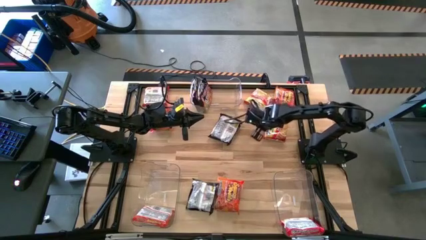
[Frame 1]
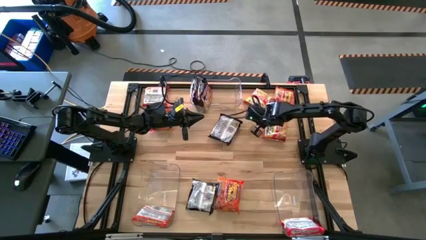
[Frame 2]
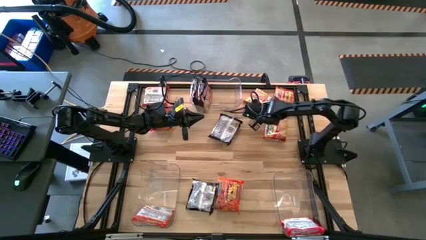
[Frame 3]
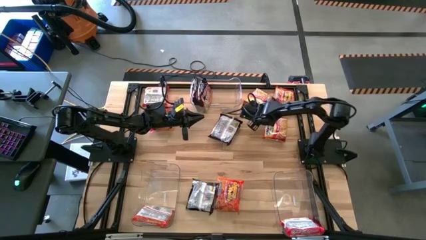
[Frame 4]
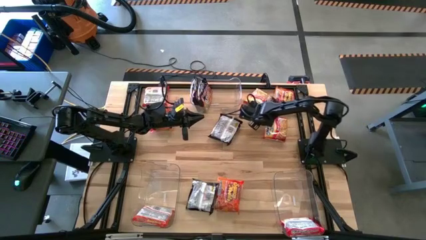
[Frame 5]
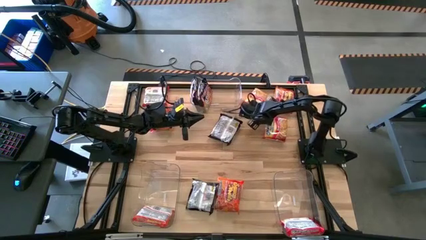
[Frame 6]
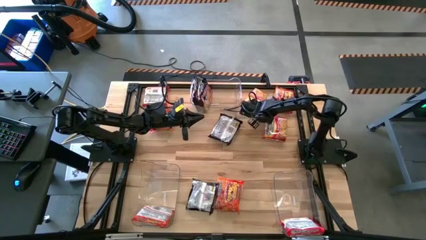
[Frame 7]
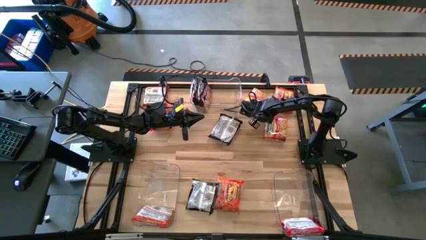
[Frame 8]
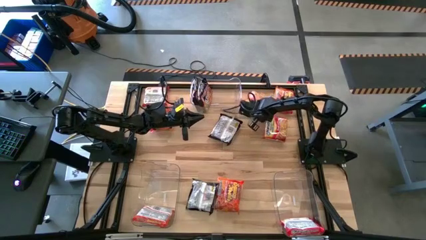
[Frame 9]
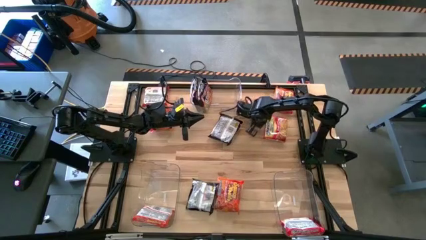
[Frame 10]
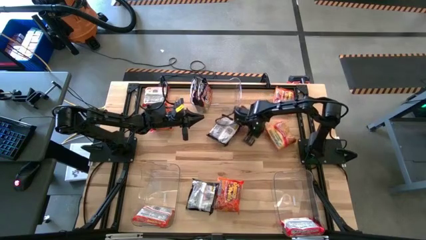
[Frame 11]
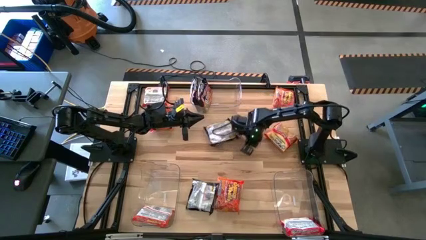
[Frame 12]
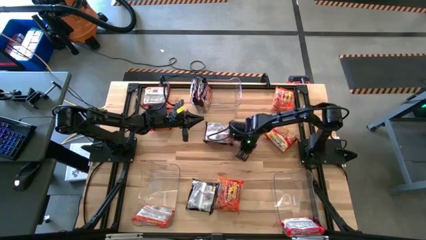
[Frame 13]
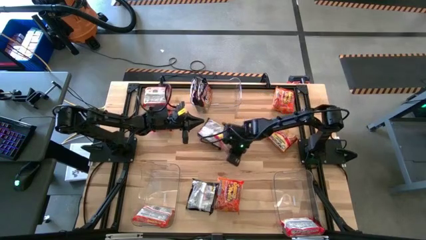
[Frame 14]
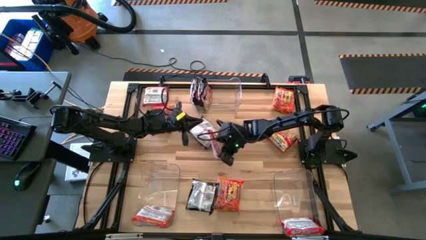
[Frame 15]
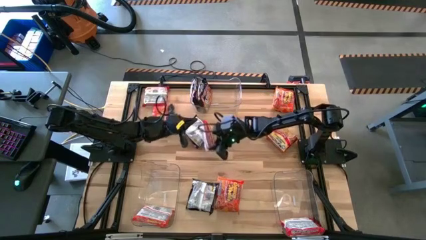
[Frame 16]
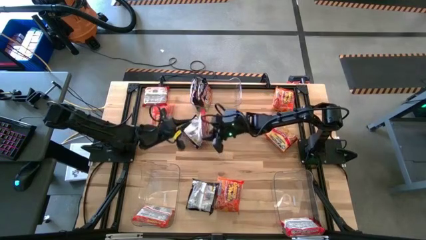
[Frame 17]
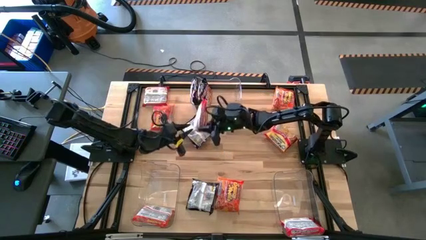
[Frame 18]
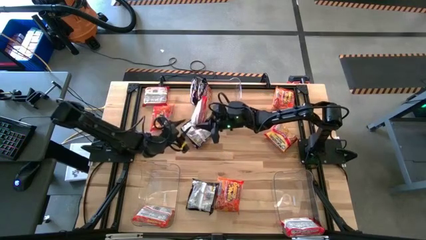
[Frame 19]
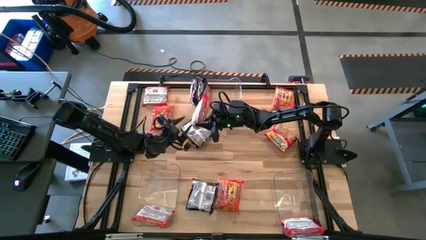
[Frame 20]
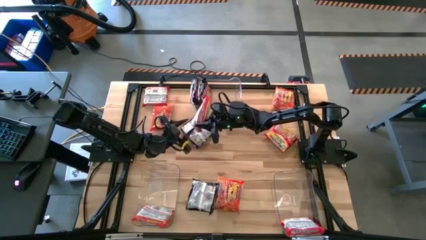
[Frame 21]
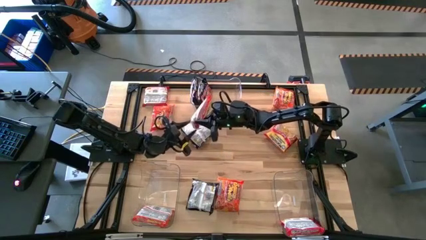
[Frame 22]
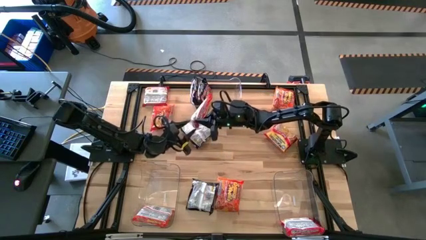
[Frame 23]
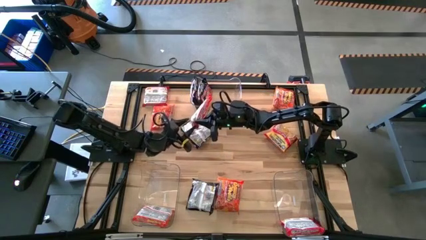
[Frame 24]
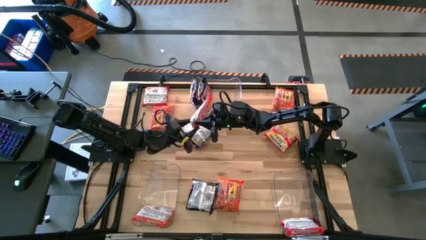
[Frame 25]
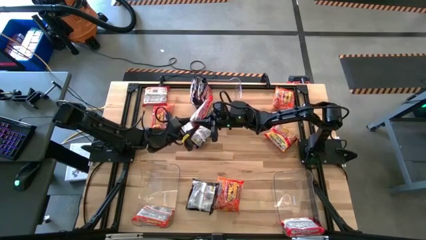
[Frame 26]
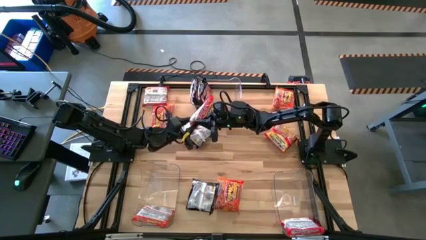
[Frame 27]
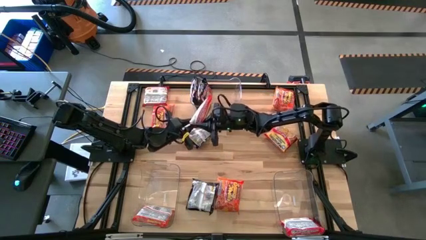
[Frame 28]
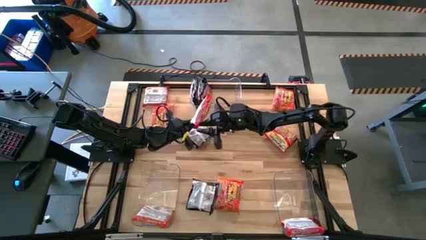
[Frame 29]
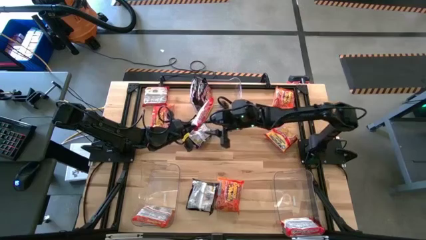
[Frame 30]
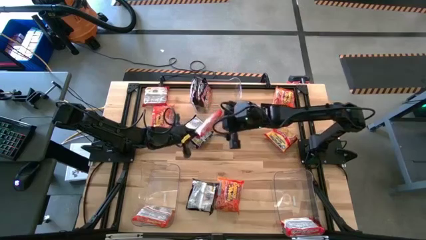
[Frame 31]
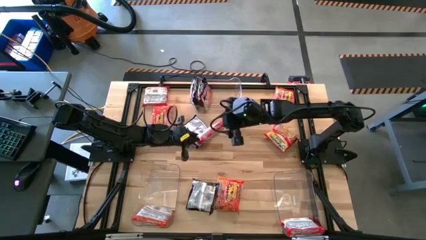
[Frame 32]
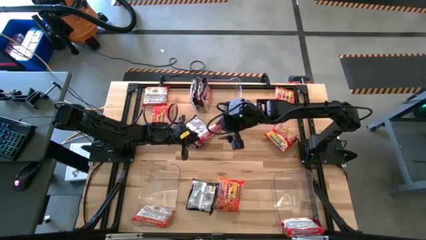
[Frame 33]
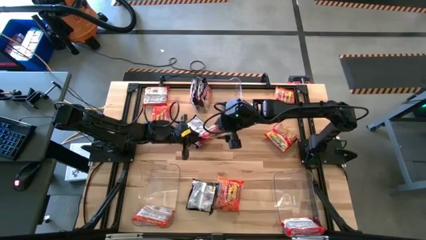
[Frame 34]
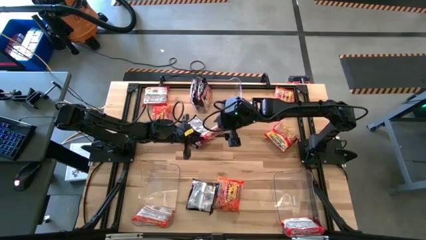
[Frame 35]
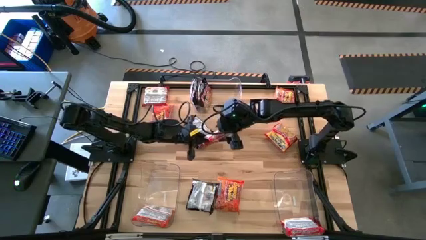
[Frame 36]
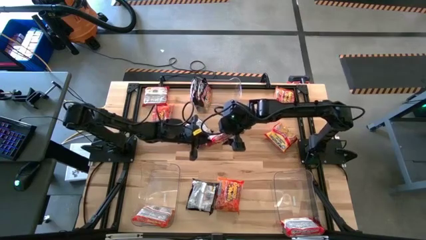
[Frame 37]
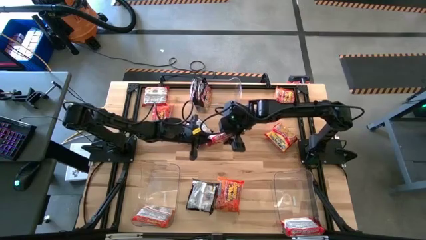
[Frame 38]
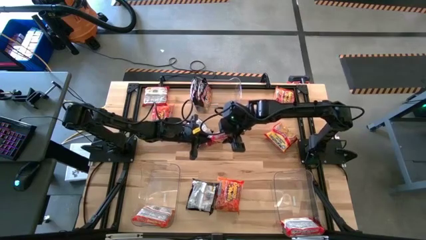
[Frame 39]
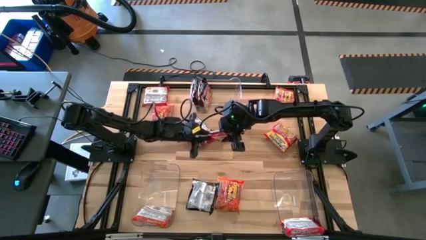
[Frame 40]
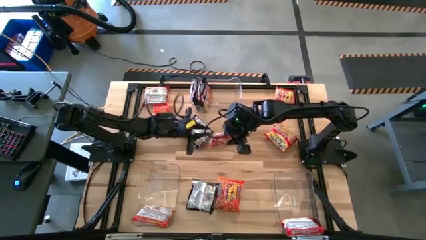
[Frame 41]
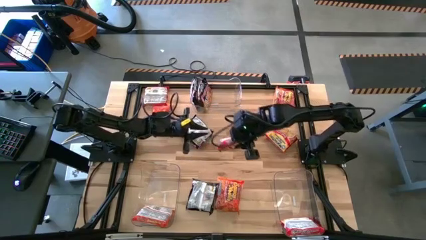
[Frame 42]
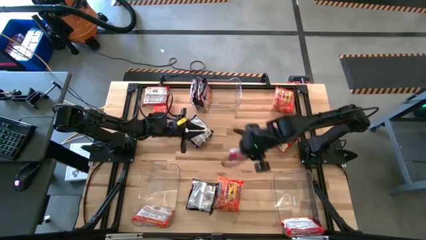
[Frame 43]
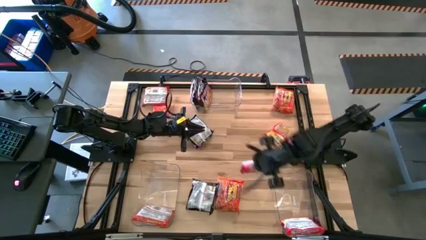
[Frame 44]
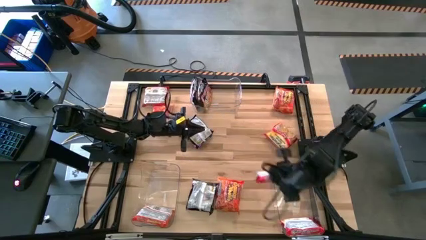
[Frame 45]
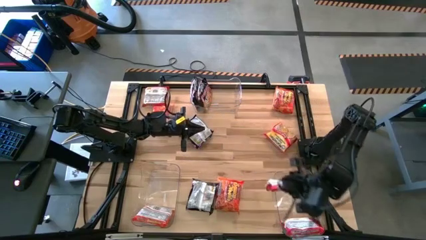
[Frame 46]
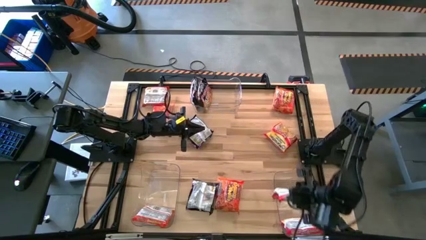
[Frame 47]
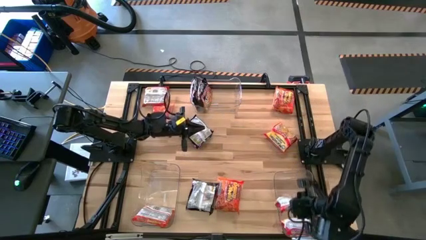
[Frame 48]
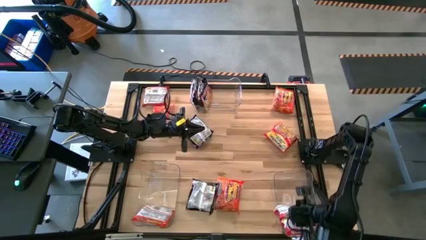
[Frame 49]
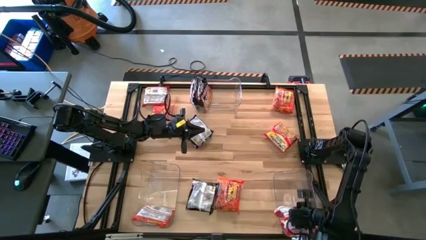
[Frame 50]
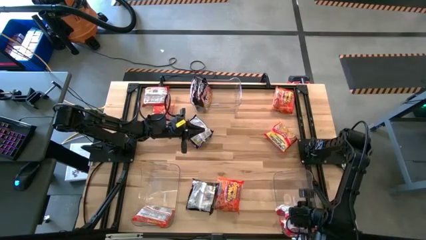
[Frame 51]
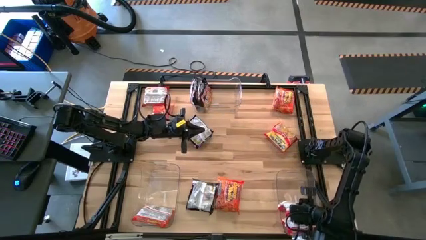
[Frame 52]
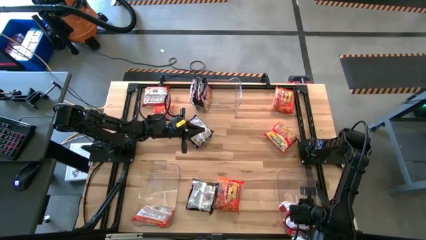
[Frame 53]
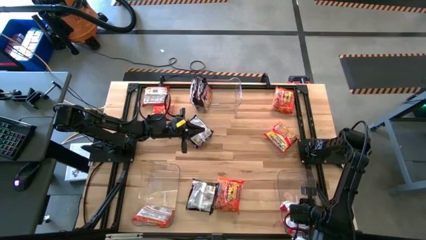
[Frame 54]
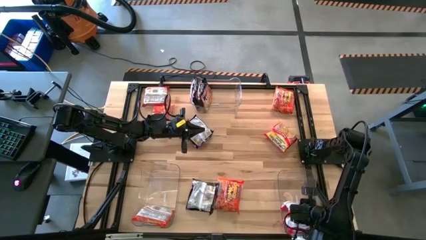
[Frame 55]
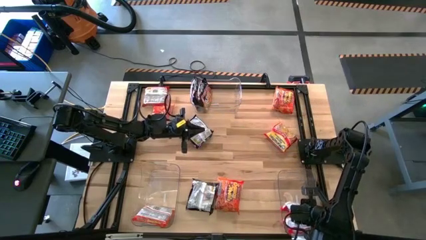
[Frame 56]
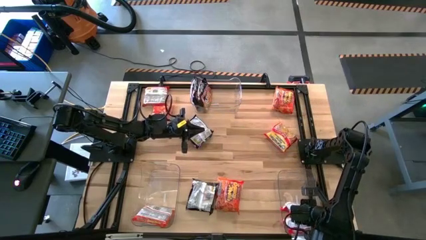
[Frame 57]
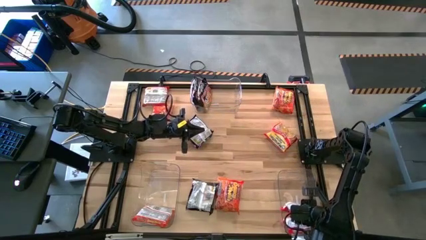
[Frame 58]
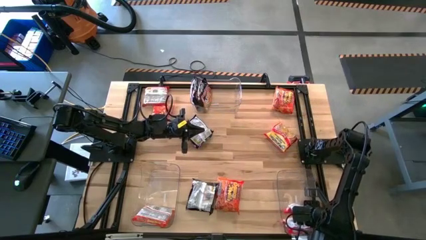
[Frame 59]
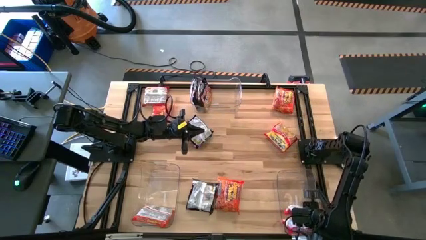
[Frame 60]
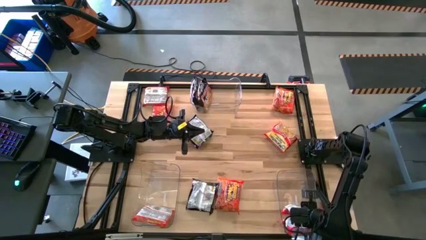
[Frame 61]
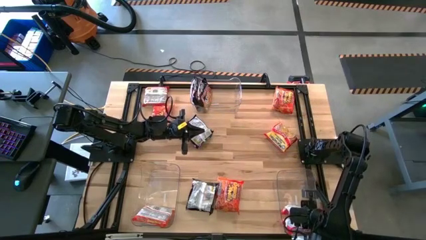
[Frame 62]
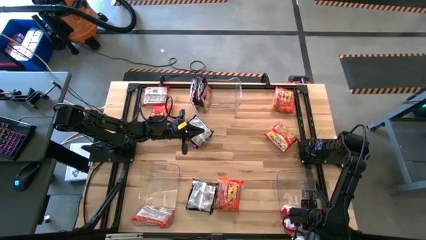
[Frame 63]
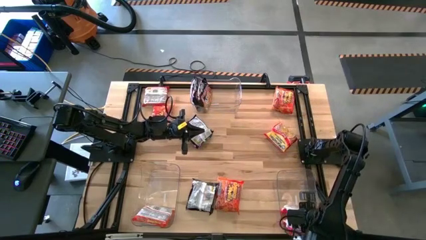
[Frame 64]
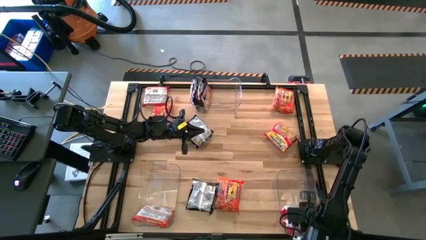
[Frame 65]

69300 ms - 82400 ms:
Task: Sort Maruchan noodles
Put the top right red noodle pack into the bottom right transparent bin
